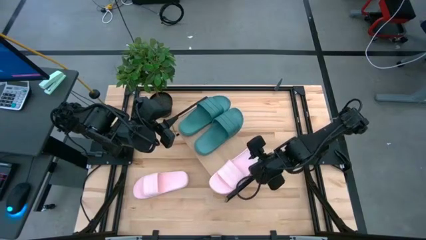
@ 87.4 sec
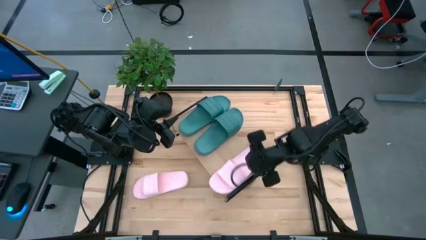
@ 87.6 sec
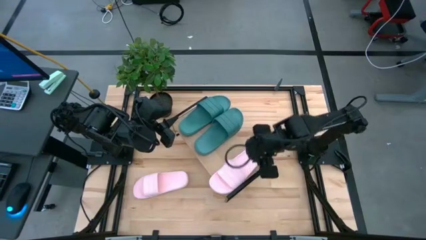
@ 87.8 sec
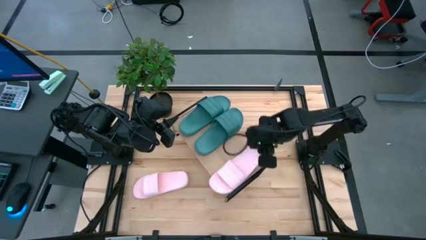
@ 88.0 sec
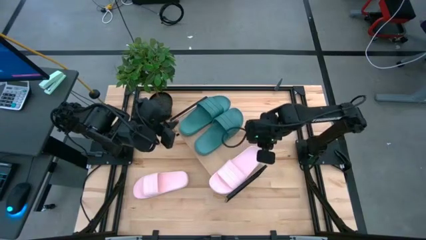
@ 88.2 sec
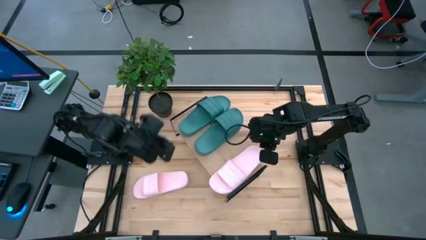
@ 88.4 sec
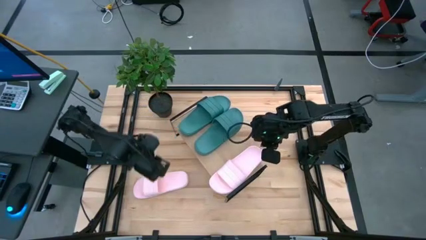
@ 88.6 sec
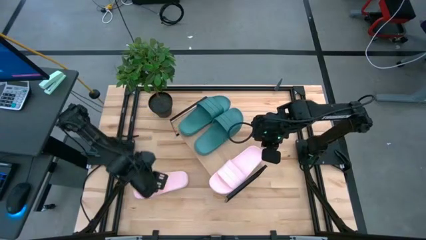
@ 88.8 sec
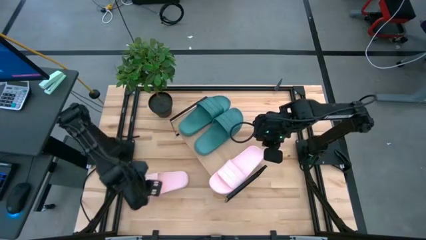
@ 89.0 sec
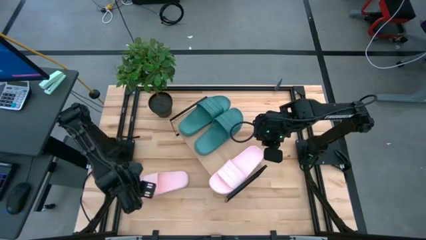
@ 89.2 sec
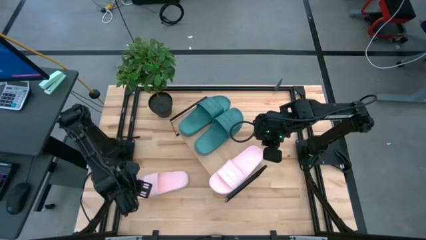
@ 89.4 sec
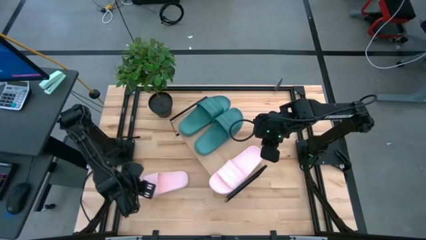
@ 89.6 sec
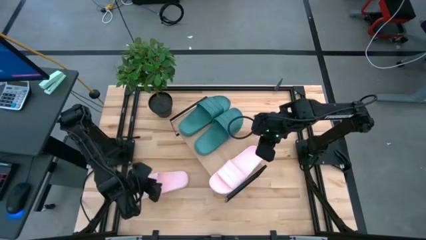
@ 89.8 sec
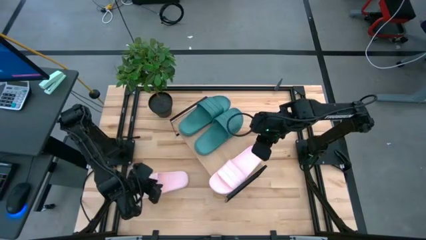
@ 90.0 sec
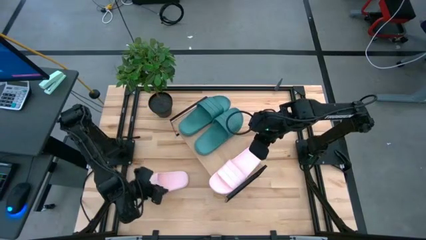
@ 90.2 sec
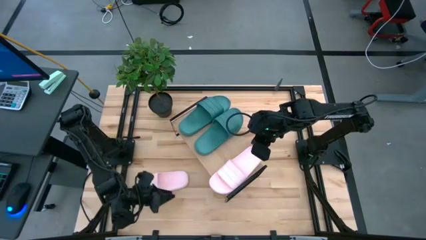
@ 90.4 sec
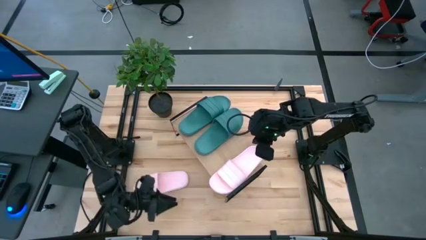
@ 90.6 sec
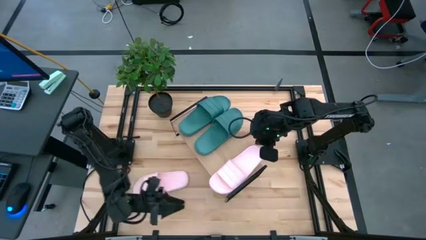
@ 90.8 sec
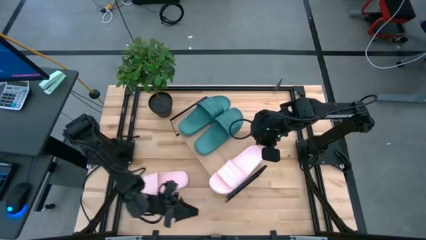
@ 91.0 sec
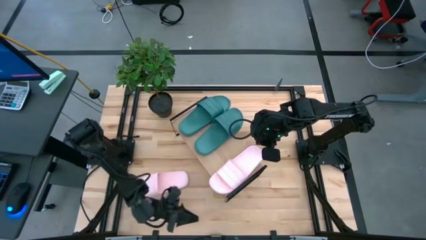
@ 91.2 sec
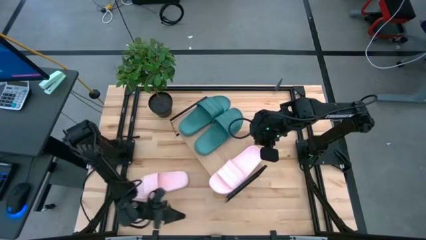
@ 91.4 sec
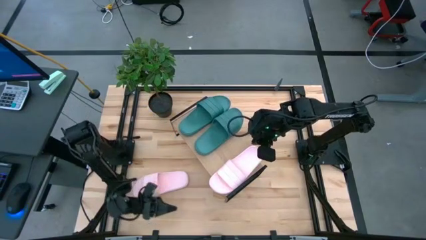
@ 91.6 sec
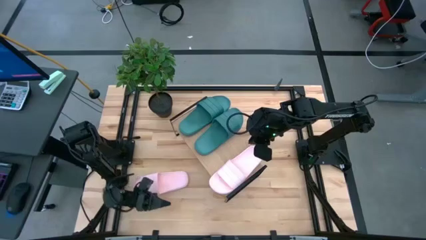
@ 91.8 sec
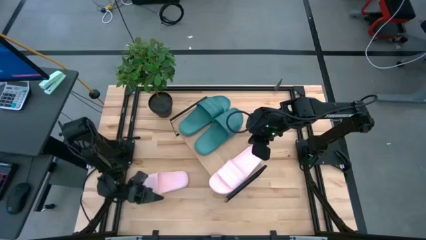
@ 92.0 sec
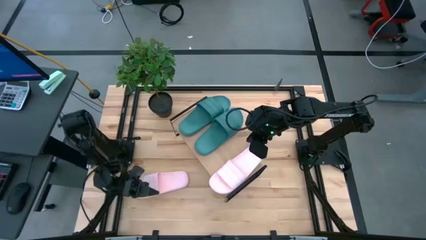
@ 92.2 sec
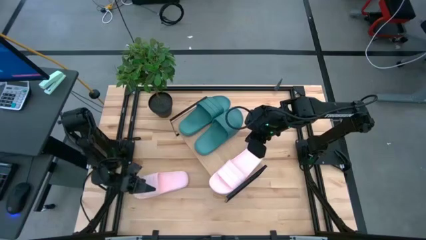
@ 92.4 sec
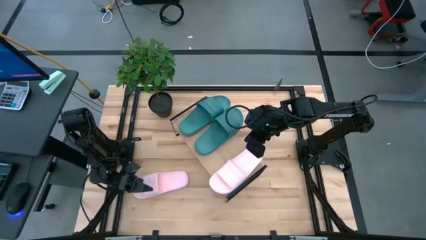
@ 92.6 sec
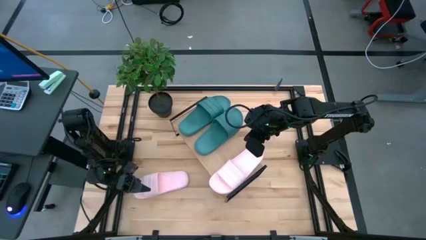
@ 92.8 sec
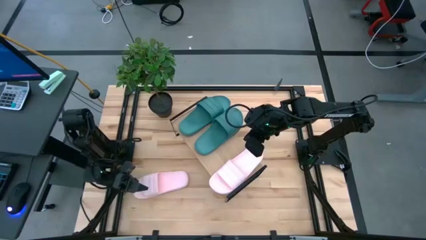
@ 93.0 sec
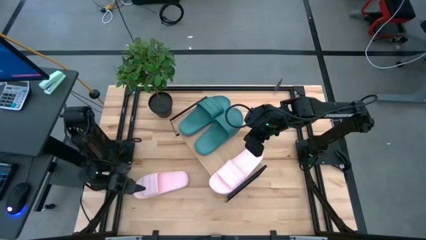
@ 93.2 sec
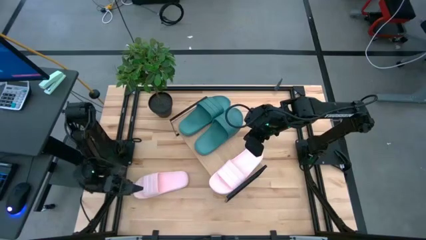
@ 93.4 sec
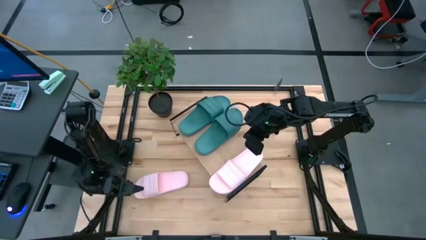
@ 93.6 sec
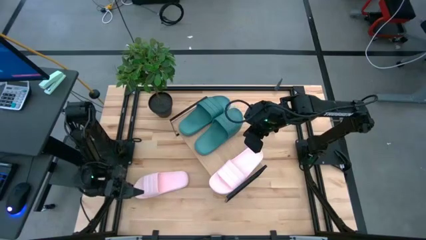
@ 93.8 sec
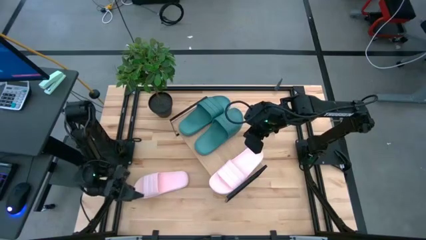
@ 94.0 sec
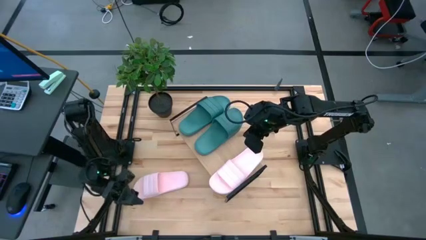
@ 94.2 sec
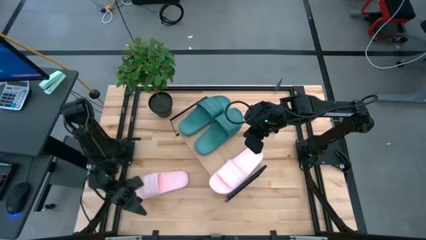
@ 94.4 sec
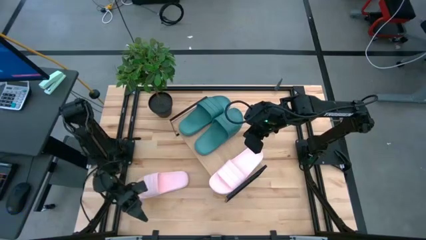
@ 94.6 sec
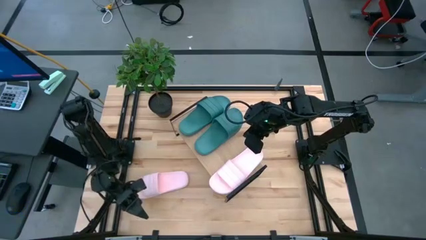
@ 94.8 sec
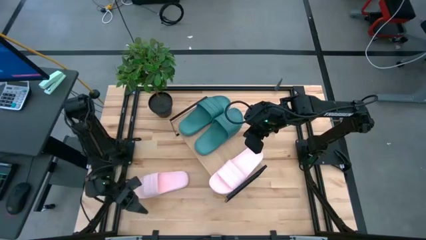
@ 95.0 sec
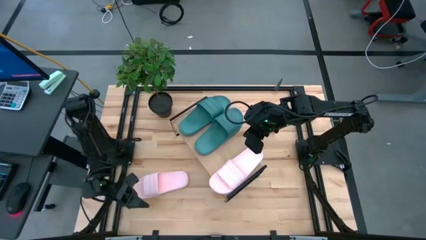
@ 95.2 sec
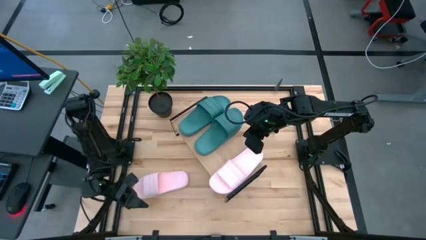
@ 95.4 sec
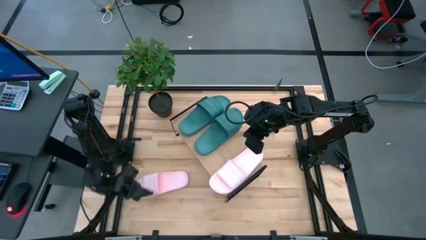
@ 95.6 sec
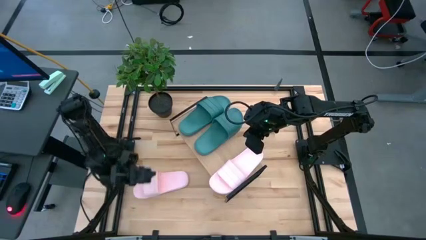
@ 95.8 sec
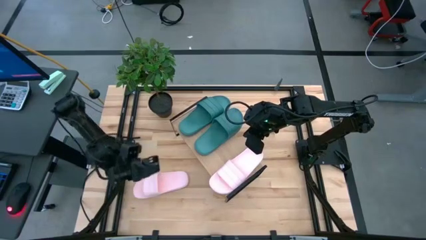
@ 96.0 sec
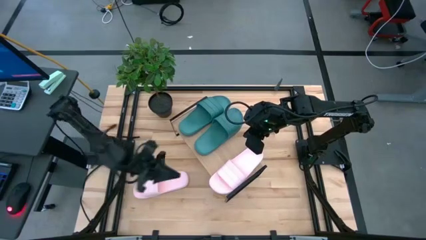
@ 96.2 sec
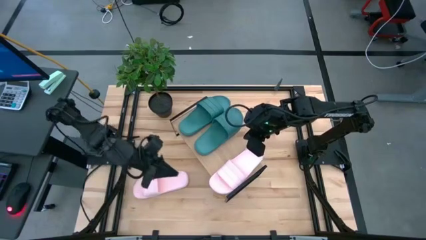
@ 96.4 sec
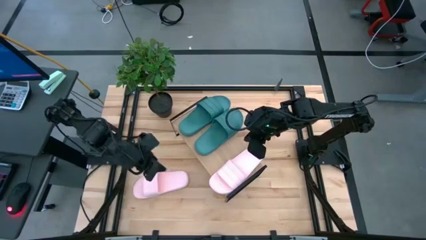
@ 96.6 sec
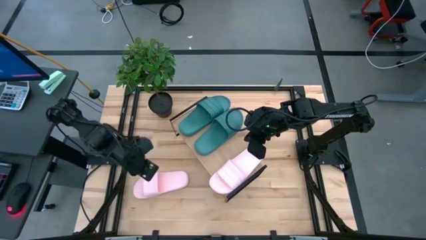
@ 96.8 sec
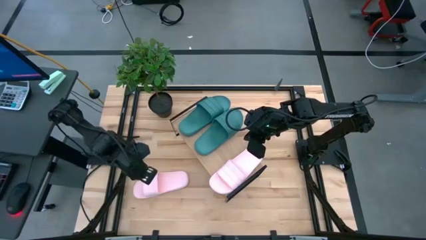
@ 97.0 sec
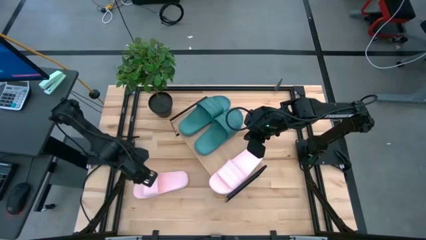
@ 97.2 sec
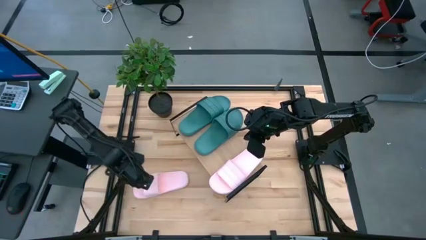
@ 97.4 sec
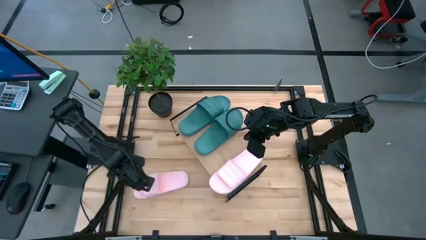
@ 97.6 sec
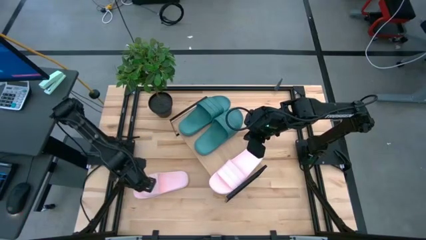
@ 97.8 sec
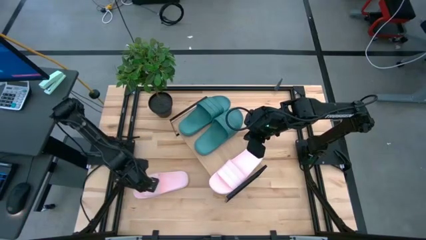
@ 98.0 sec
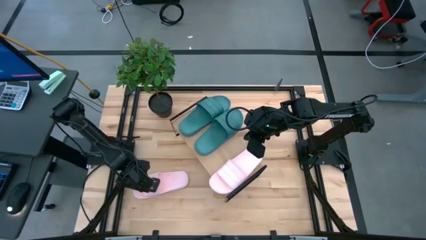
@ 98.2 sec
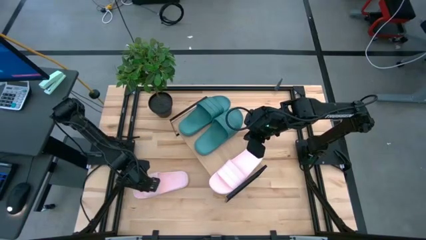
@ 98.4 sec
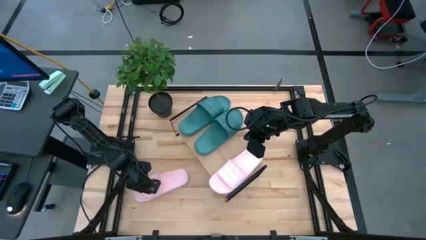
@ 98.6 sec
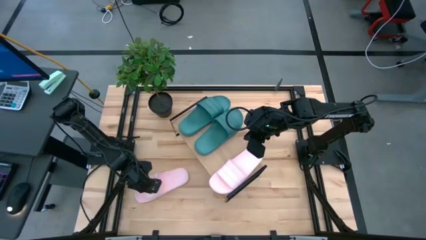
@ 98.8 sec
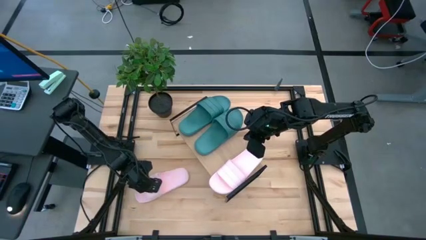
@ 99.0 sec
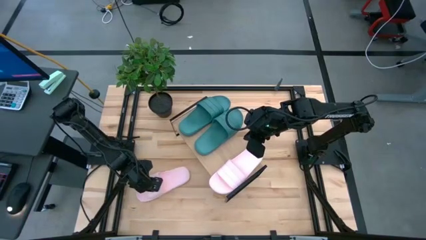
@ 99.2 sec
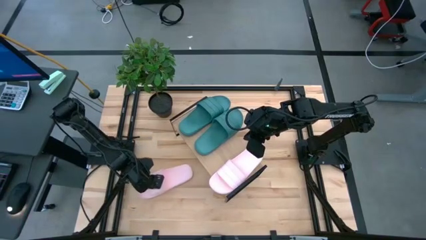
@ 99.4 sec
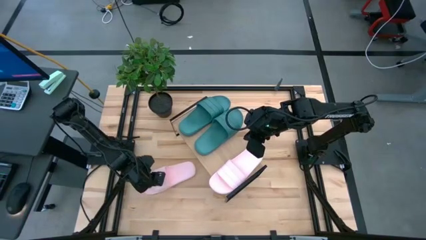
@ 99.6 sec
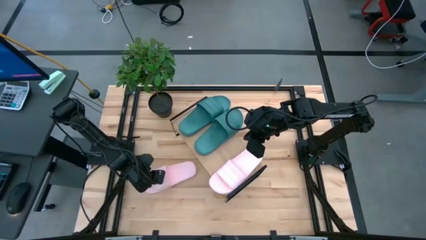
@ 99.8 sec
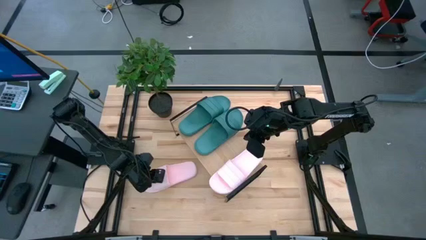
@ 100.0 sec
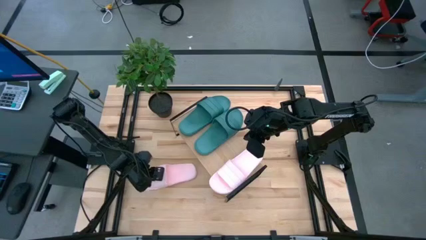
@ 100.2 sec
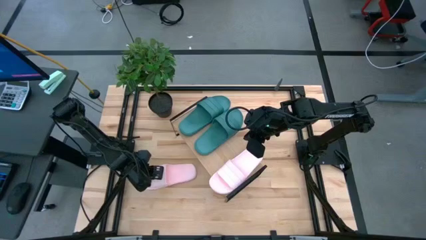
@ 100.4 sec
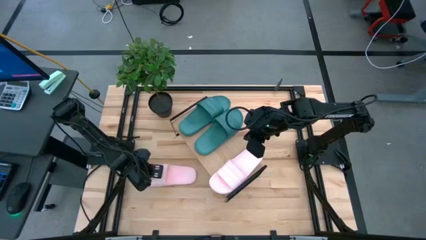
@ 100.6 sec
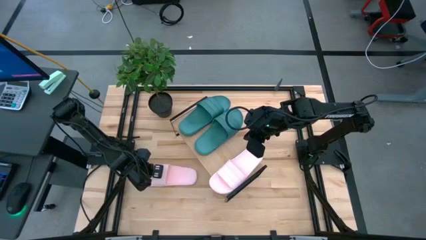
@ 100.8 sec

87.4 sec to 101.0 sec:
Task: Pick and place slides into the shelf
Put the pink slide slipper on the shelf

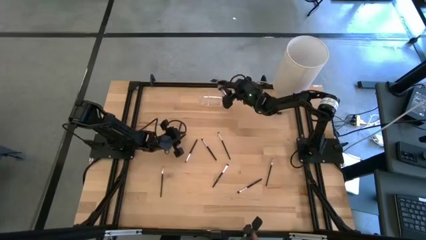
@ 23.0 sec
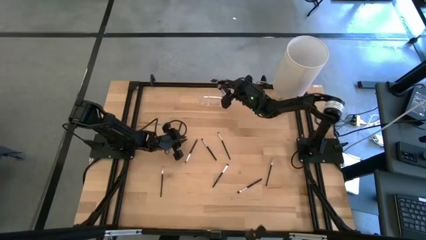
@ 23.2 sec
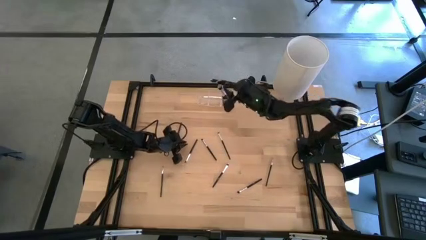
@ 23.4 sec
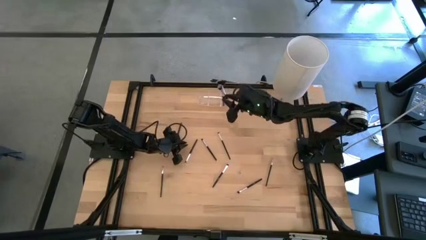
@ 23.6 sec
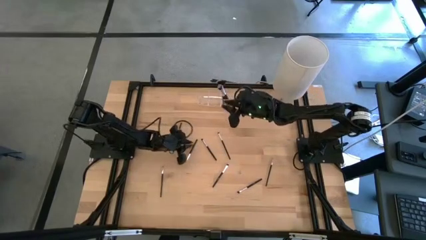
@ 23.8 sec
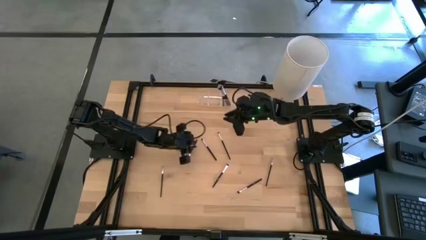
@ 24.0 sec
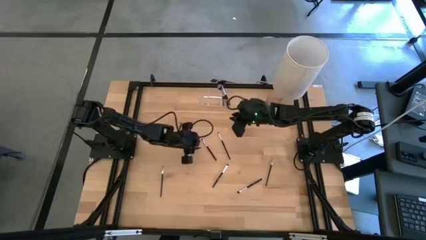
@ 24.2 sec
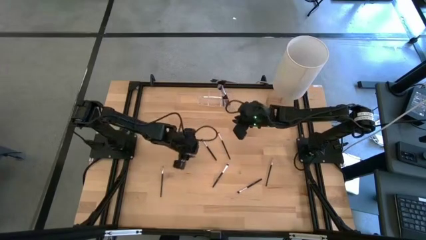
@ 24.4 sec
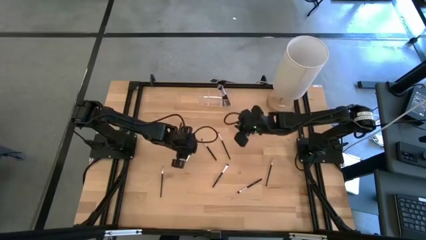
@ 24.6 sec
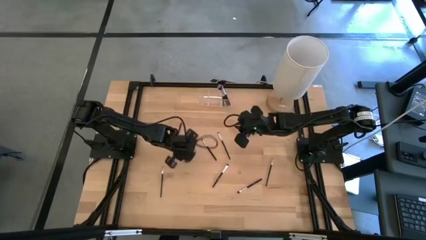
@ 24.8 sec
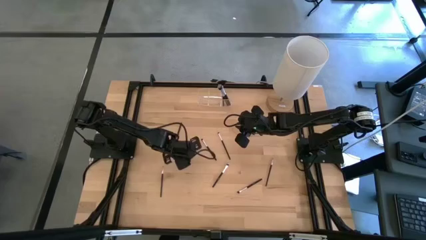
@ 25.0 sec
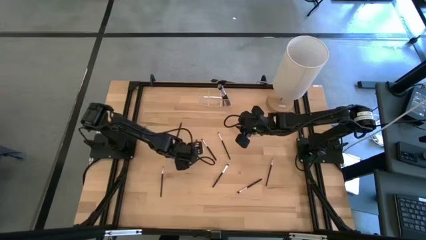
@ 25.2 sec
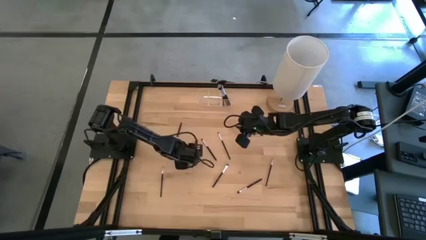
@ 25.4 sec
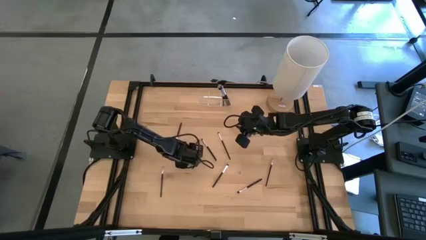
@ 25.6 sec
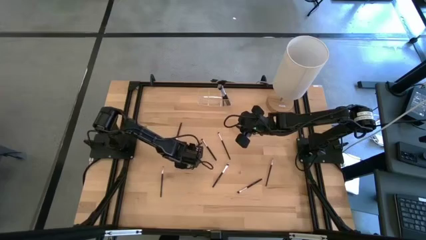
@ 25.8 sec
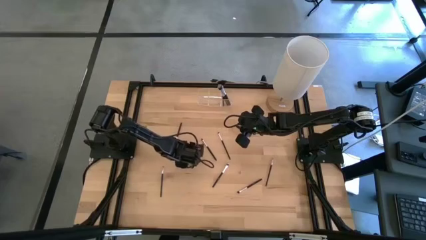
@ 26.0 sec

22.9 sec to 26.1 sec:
Task: Put items in baskets/containers
Put the black eyeshadow brush into the transparent organizer
